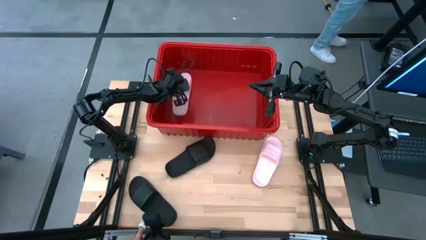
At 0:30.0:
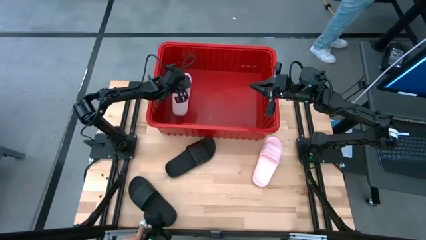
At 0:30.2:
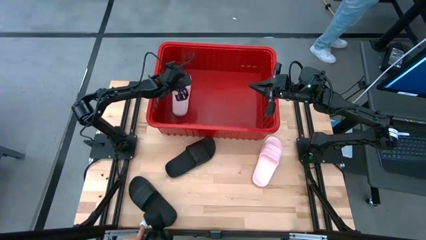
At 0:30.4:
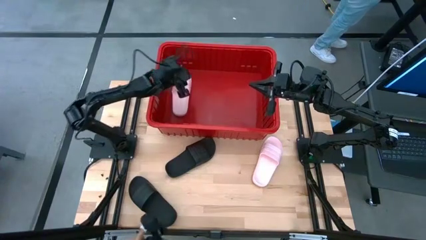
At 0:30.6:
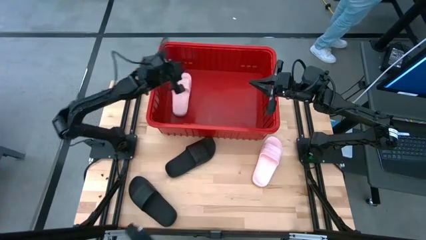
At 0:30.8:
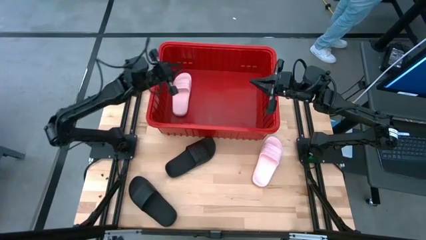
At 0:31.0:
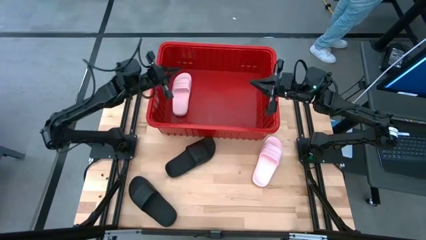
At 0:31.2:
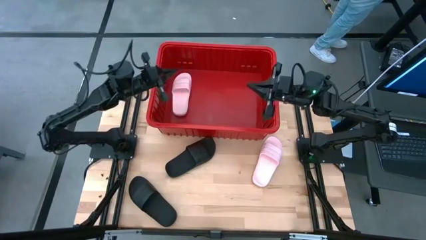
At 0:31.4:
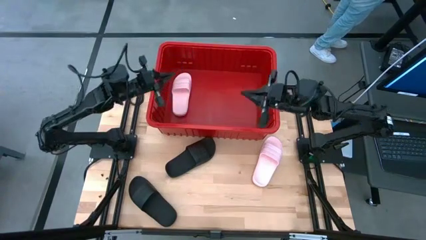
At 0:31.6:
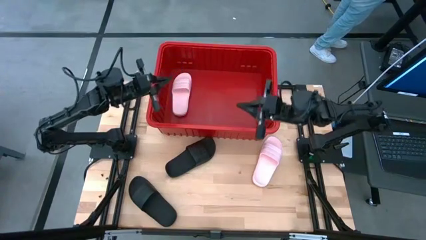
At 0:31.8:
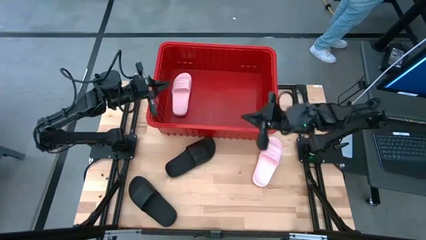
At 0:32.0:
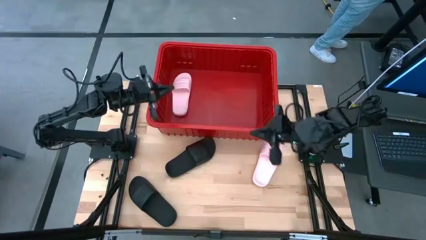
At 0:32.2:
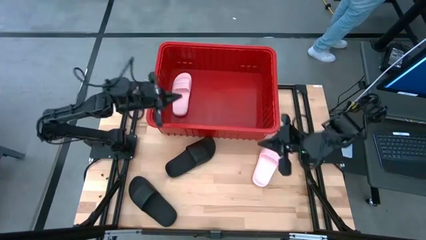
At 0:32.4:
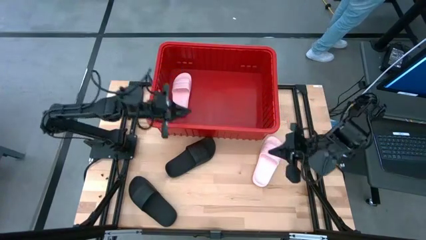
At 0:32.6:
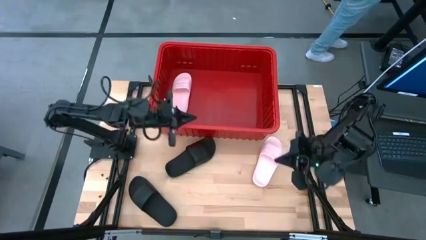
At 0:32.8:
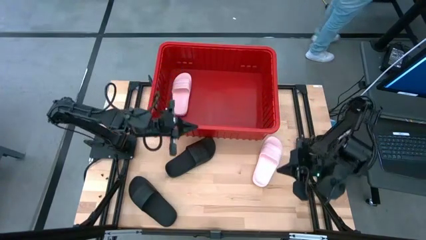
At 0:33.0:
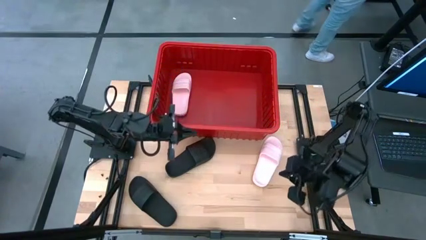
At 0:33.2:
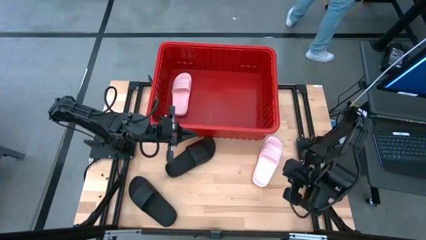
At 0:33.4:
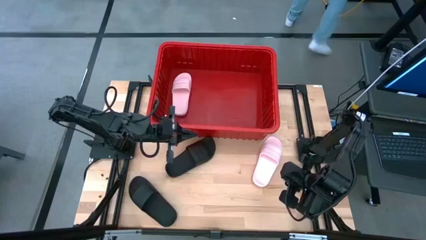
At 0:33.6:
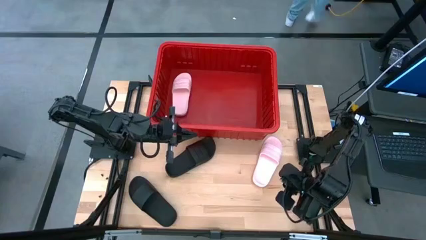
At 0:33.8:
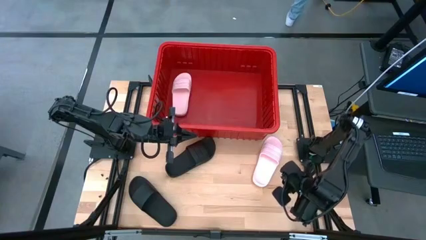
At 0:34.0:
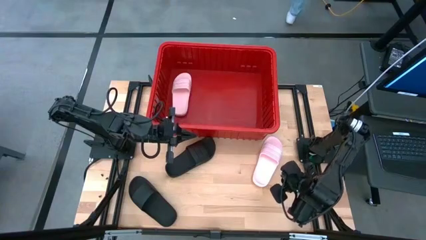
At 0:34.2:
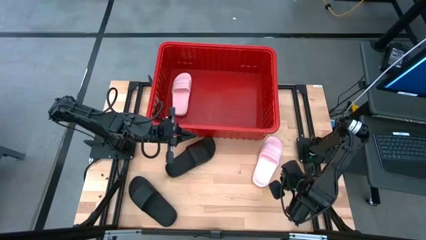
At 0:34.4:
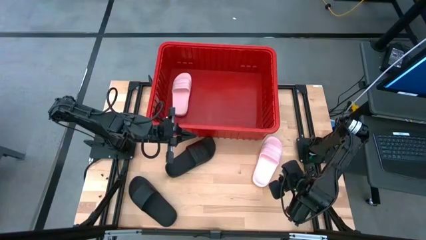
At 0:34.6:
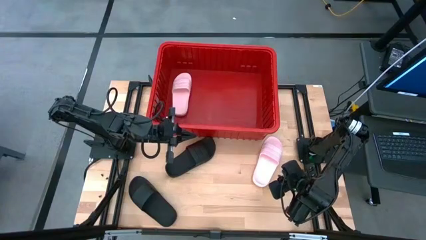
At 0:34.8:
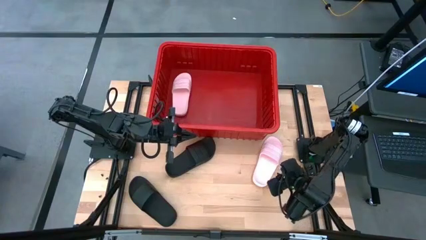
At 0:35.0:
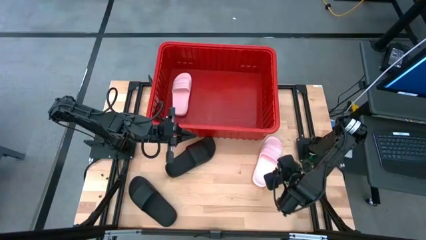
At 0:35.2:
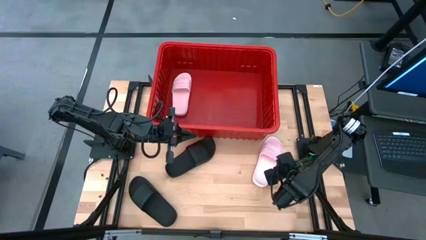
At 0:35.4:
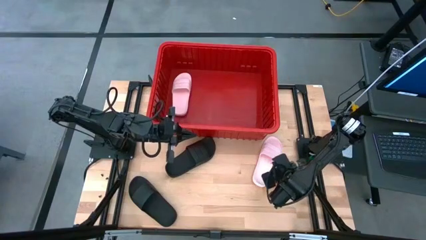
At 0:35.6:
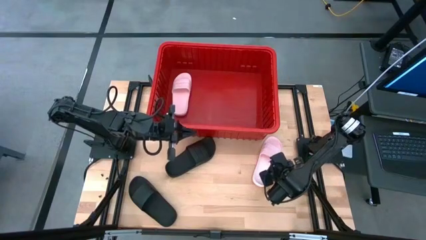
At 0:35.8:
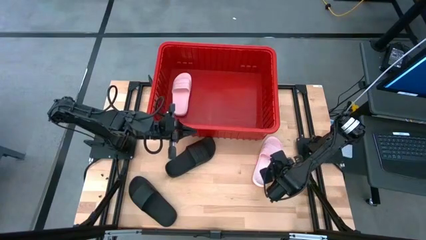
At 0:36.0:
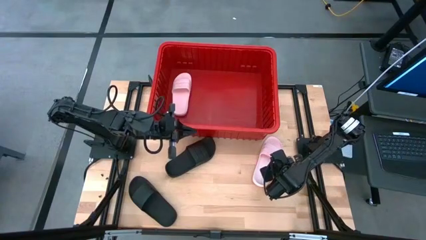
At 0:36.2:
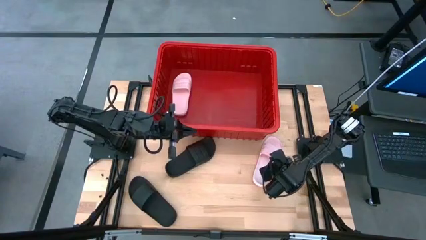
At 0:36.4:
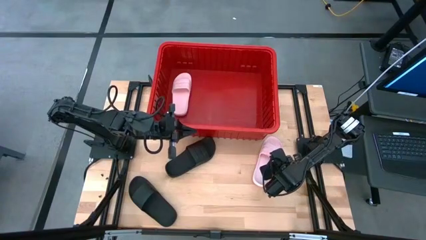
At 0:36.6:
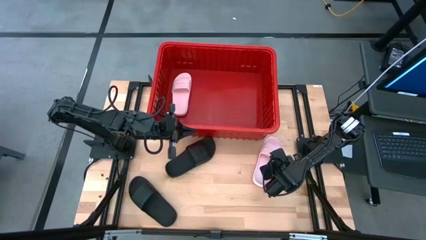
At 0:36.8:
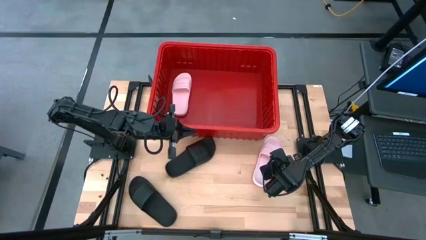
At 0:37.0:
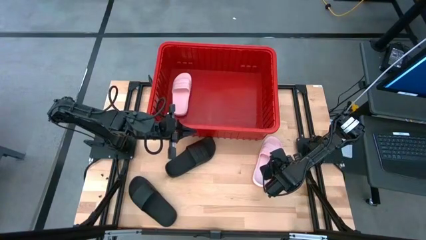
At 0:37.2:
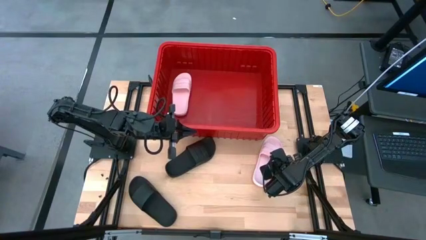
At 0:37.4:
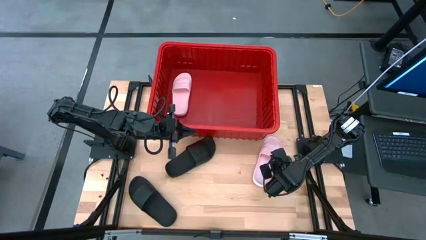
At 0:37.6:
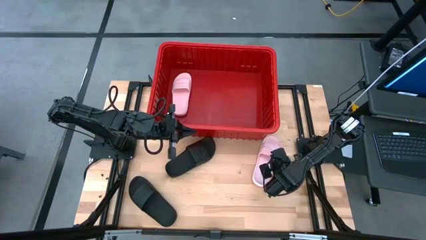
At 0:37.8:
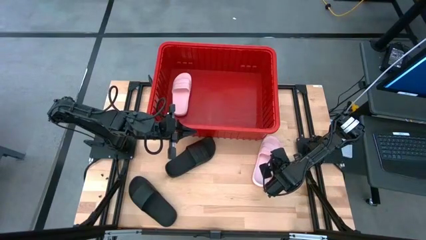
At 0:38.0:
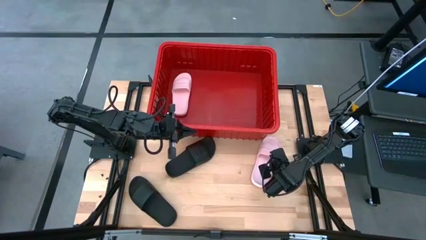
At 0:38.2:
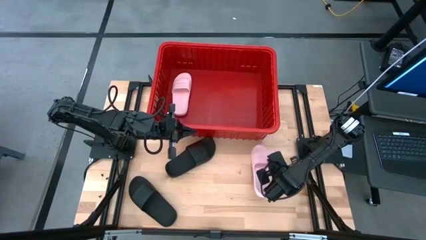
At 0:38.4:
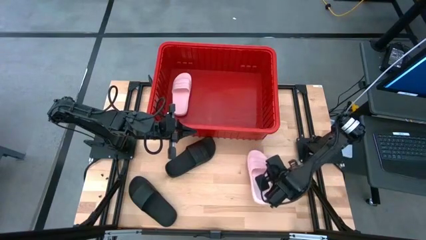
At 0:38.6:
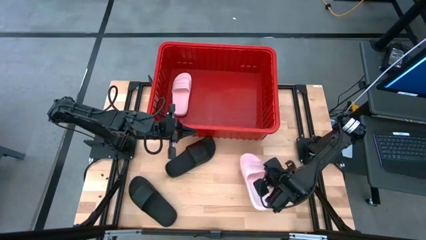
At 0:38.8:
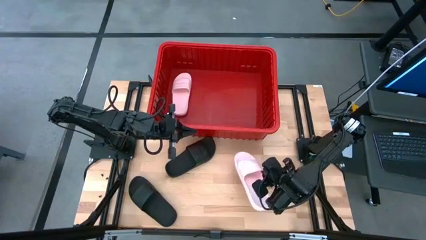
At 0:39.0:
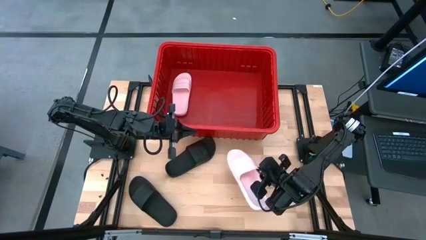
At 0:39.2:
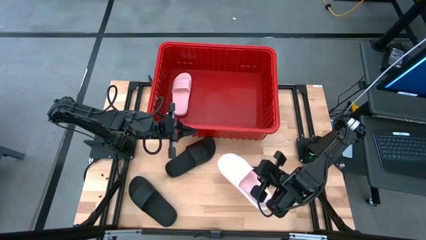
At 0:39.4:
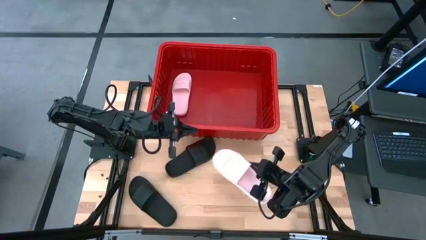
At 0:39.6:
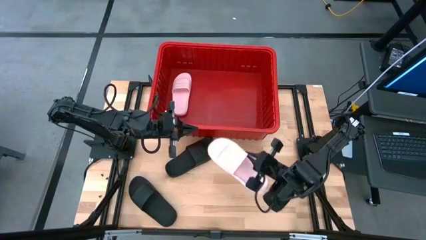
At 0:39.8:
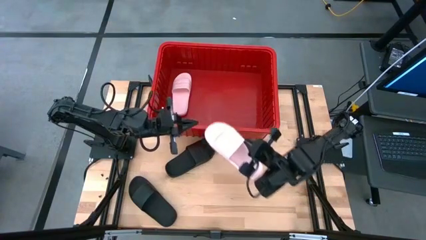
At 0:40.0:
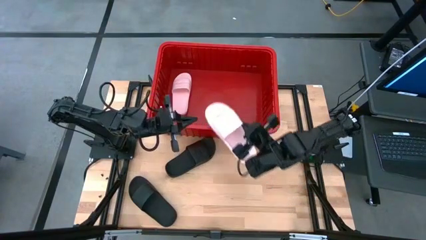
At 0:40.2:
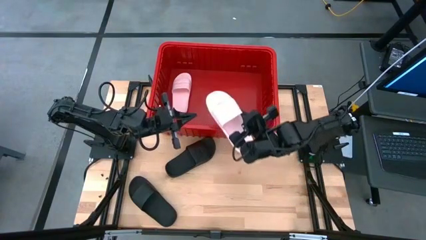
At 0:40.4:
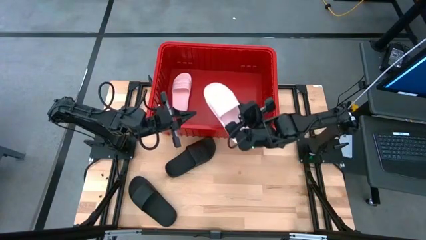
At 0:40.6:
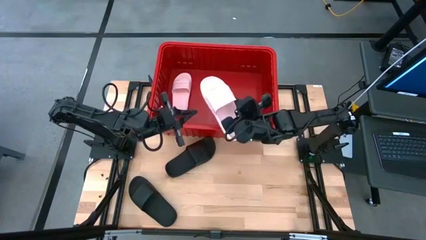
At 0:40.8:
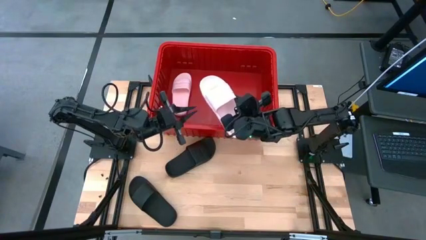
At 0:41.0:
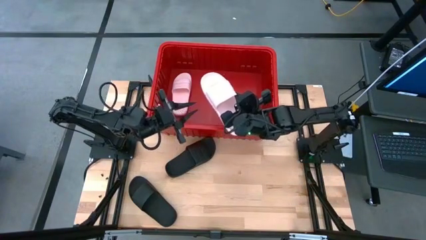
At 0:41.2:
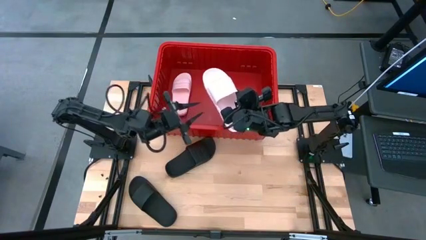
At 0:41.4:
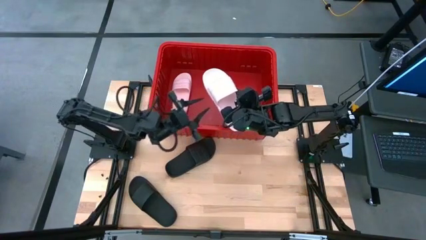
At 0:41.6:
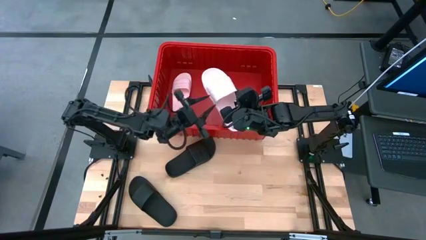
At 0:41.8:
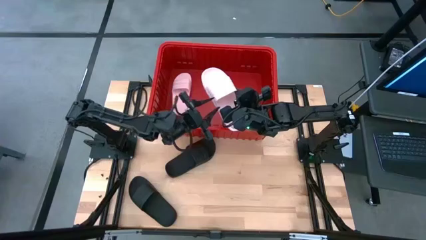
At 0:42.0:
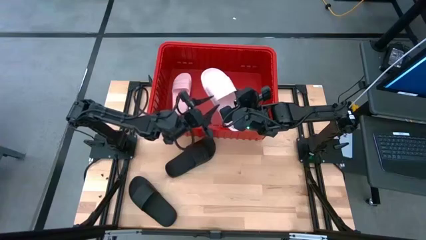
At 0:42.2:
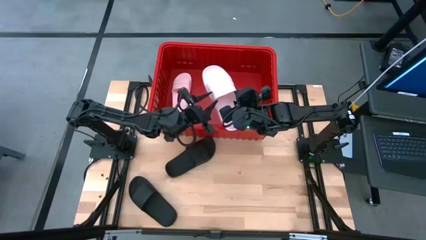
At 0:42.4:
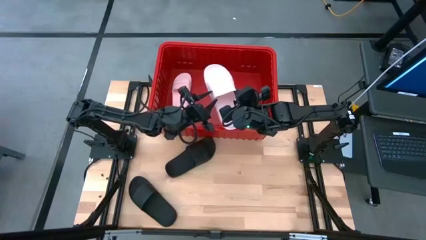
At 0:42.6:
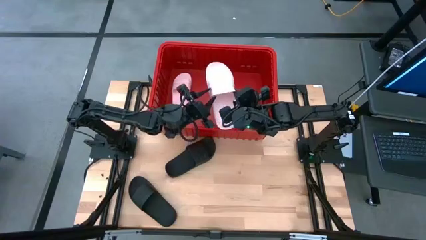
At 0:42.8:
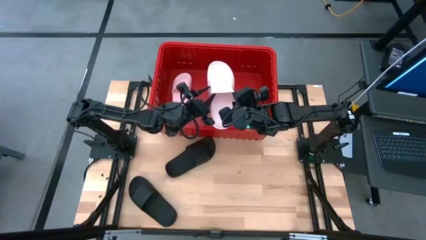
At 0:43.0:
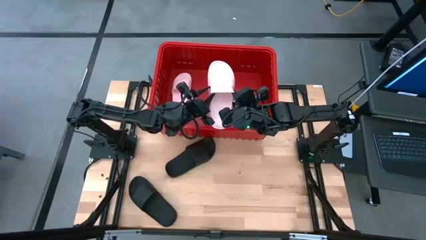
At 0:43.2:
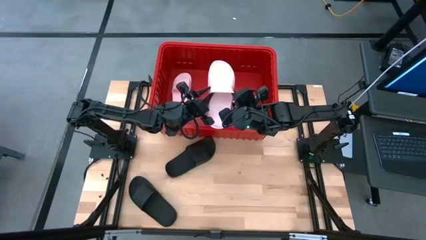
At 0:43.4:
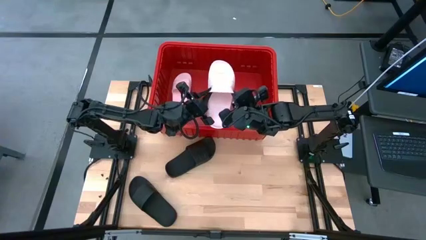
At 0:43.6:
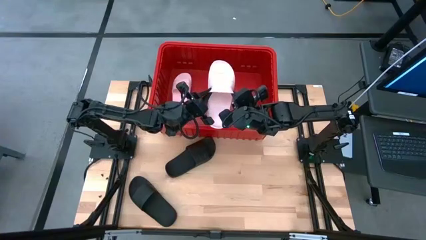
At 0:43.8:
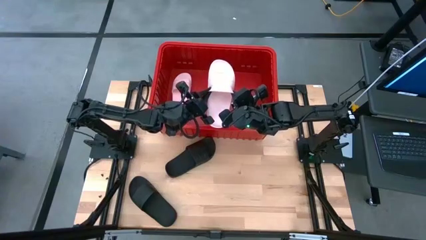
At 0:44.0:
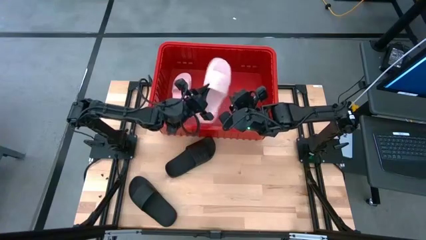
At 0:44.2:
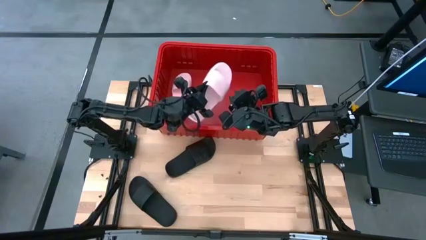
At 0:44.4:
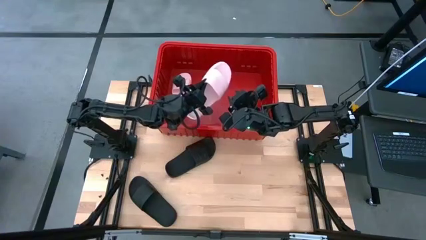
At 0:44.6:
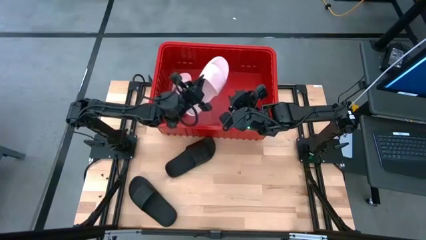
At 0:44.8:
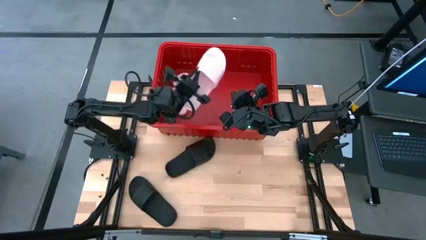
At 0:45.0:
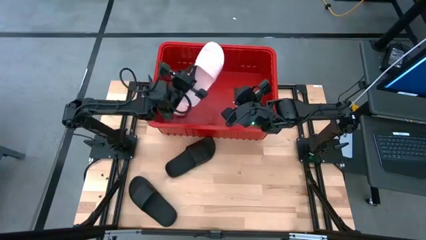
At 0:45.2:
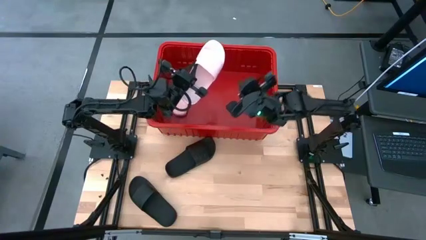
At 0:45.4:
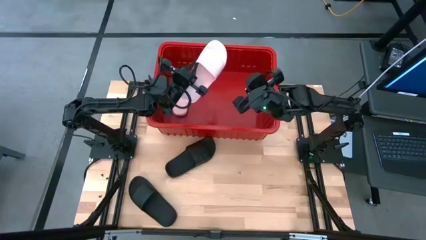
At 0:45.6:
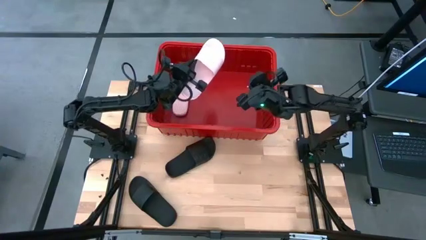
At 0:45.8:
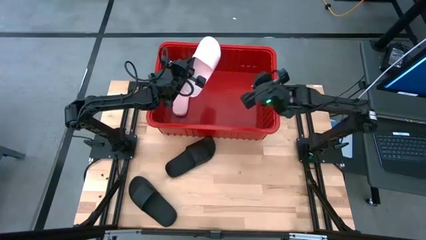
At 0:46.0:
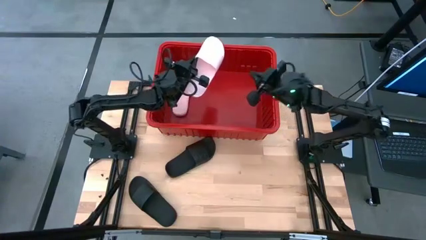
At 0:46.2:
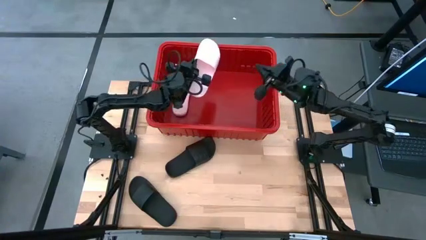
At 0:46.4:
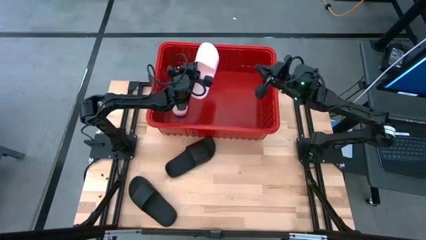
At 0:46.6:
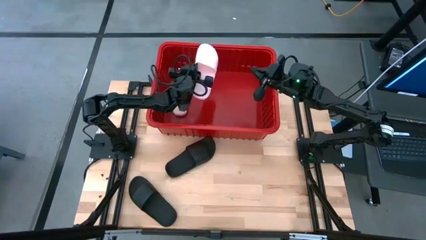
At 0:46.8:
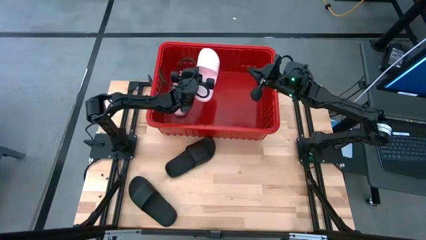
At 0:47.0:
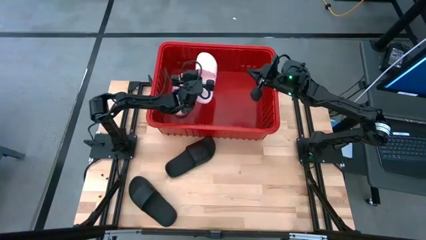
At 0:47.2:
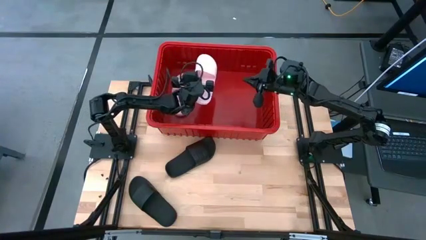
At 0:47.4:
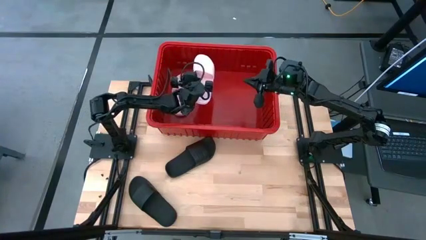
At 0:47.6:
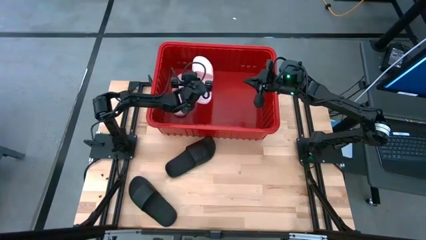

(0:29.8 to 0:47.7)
Task: Pick and place slides into bin
Put the pink slide into the red bin
